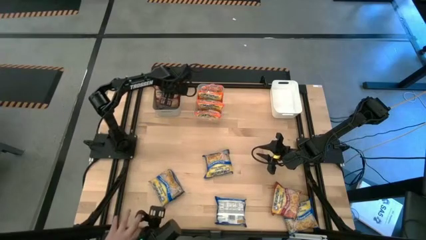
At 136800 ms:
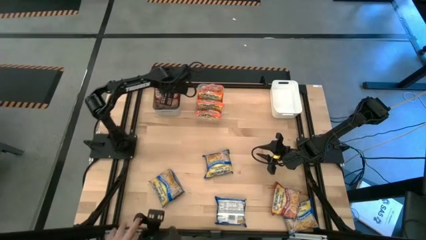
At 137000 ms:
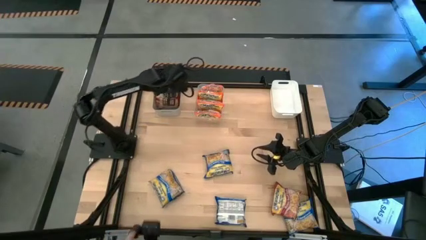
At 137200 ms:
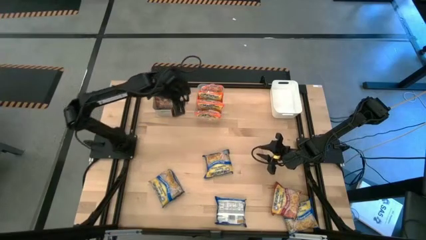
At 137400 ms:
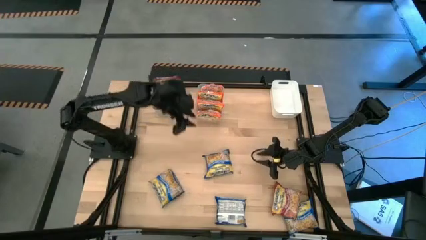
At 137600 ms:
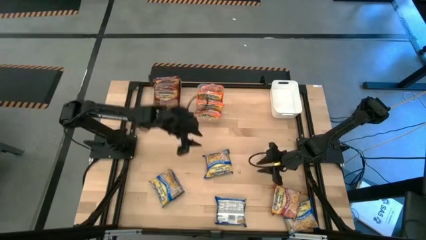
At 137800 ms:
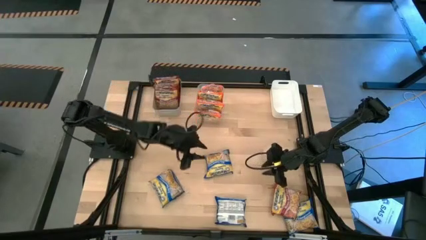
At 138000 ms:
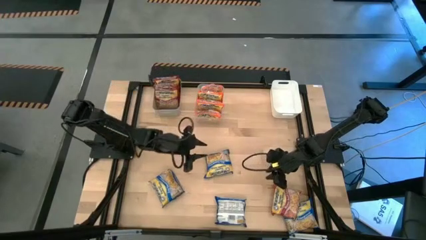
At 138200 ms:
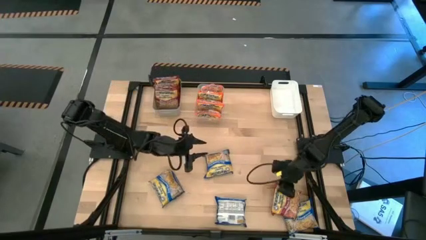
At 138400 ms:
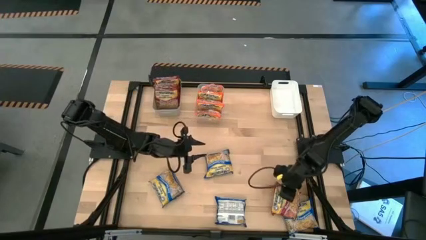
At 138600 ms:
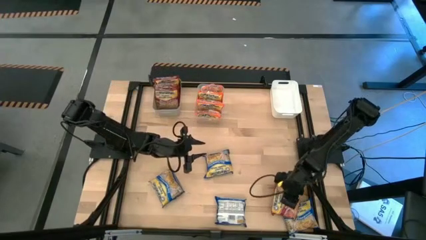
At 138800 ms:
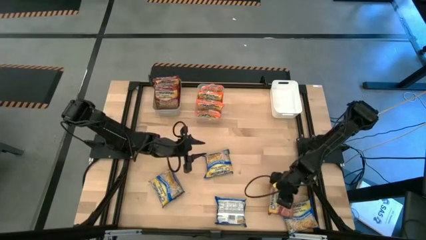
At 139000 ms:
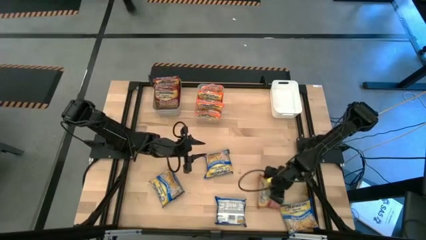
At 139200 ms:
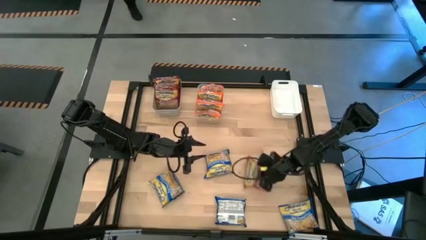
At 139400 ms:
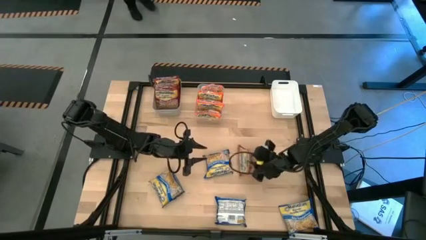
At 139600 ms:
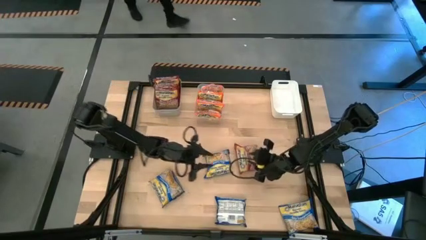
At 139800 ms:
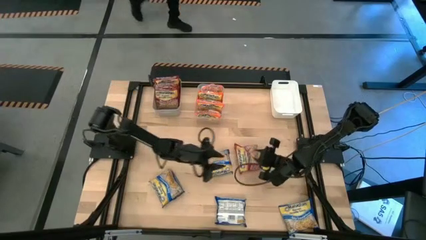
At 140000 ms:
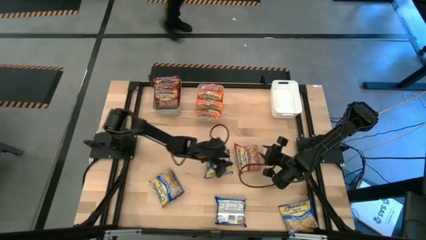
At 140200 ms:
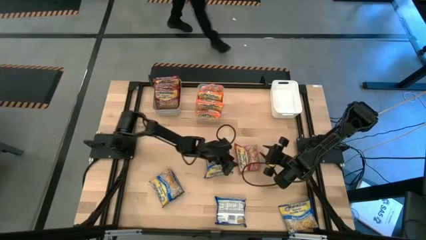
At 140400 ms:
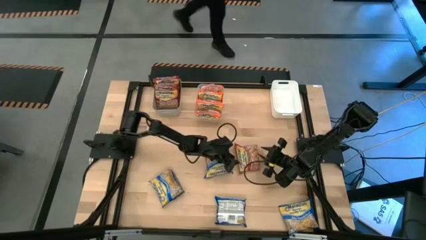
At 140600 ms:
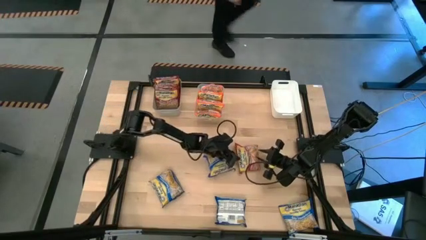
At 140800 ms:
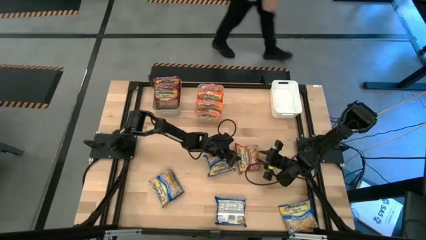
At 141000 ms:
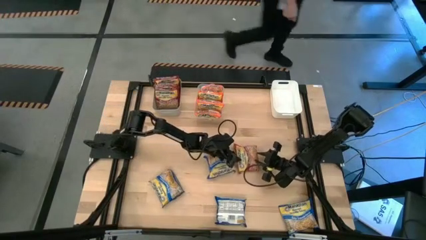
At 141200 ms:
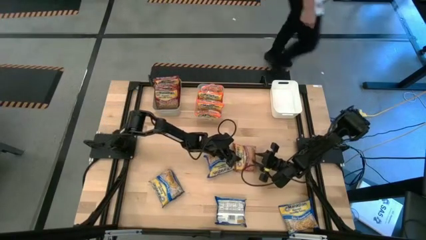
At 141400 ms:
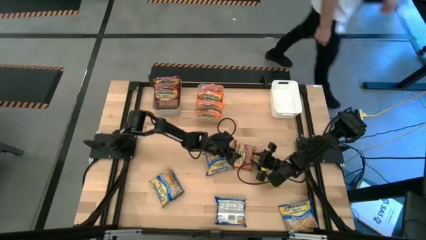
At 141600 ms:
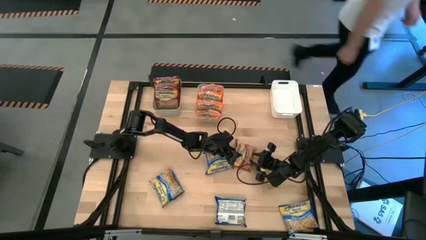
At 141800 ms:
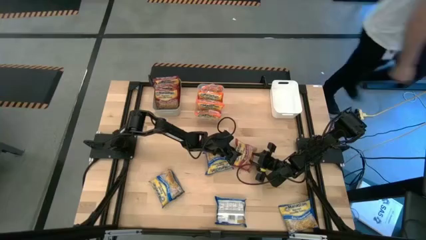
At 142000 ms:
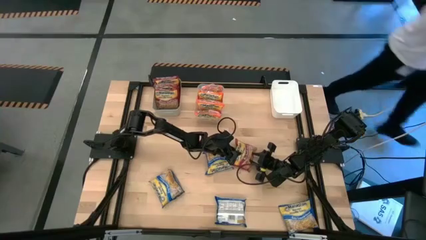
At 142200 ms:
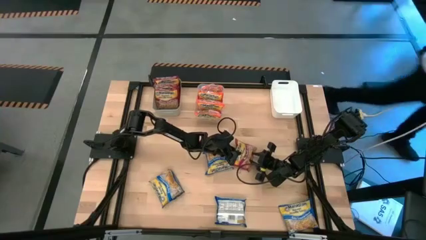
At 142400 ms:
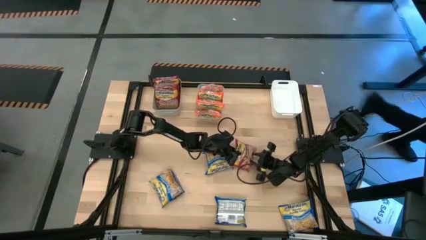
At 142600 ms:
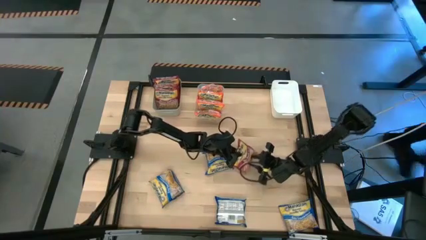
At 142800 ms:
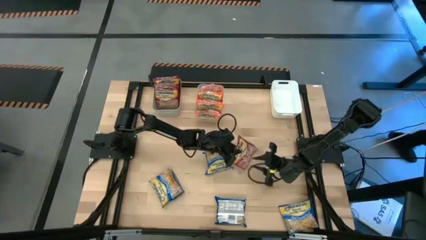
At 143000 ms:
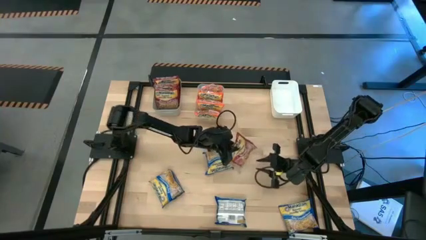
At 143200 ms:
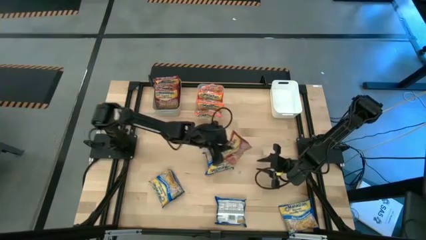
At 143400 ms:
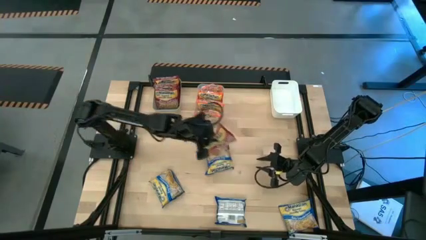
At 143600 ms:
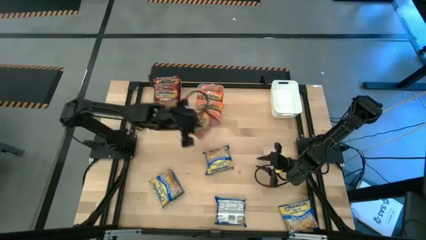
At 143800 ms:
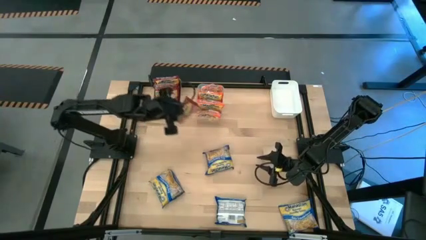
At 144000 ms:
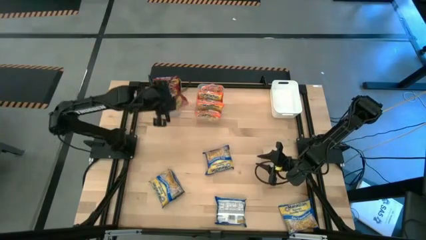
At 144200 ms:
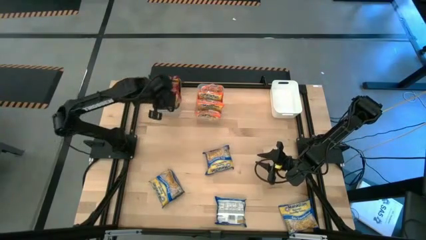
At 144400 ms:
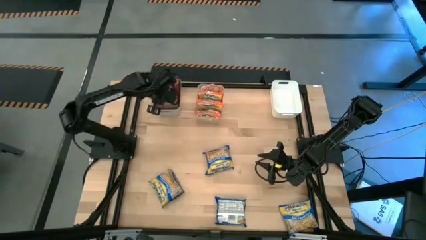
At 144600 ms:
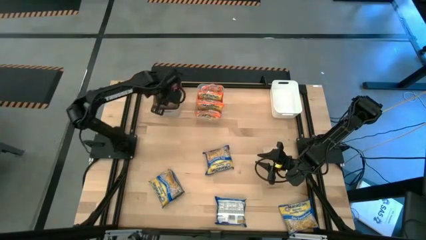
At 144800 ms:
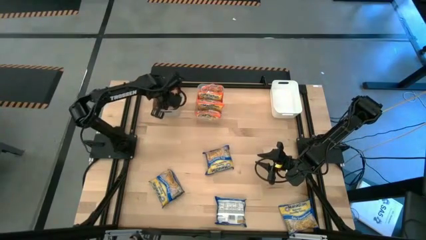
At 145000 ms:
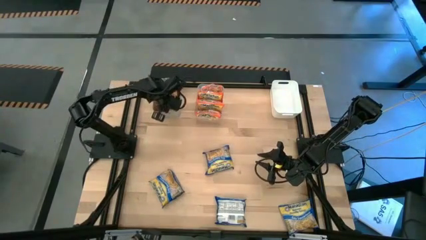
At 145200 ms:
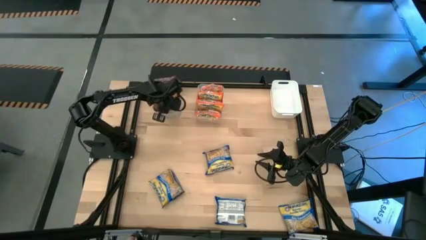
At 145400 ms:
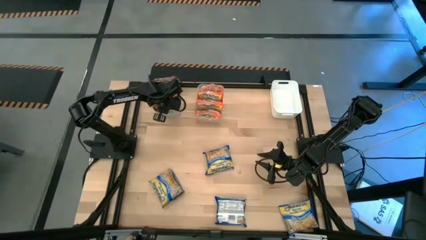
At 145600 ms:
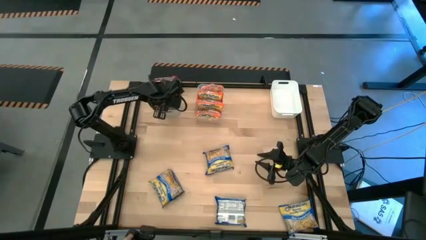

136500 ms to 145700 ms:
Task: Sort Maruchan noodles
Put the red noodle into the gray bin

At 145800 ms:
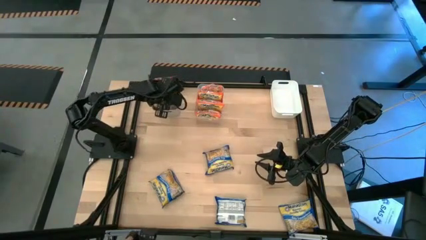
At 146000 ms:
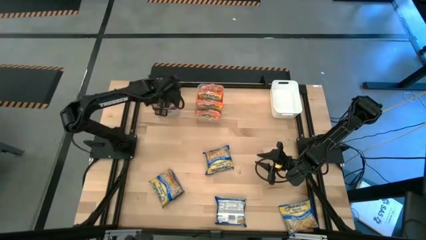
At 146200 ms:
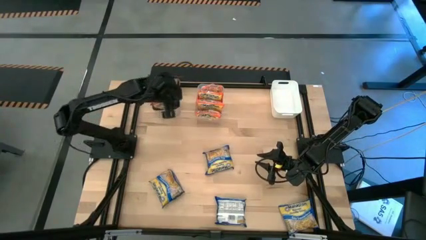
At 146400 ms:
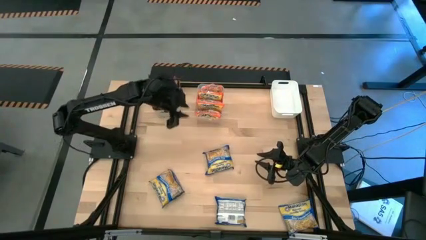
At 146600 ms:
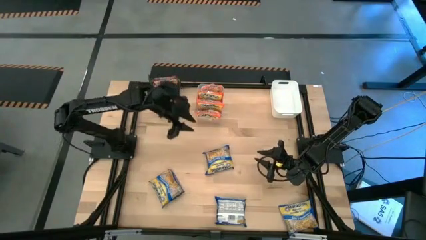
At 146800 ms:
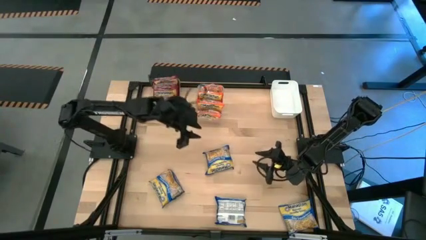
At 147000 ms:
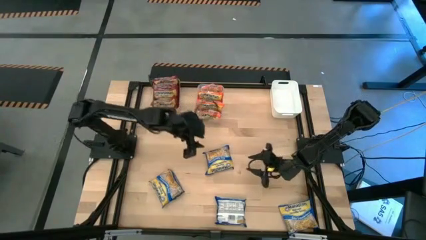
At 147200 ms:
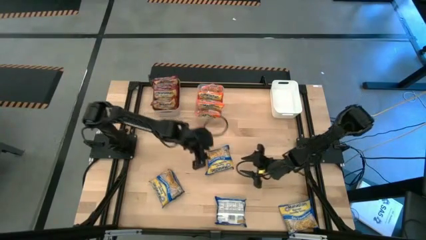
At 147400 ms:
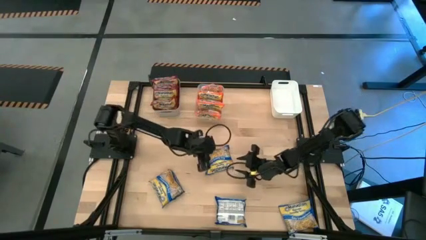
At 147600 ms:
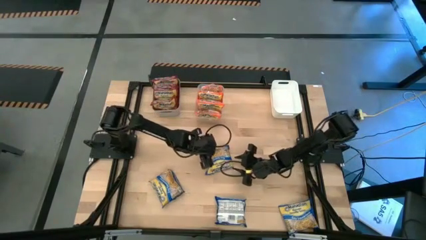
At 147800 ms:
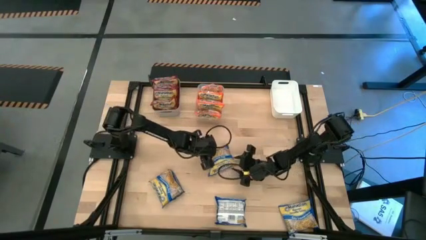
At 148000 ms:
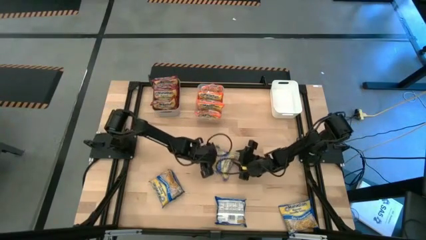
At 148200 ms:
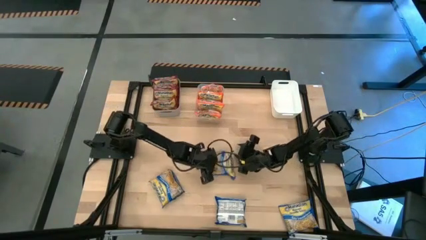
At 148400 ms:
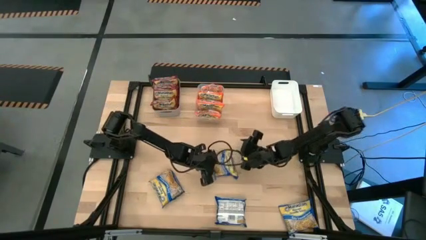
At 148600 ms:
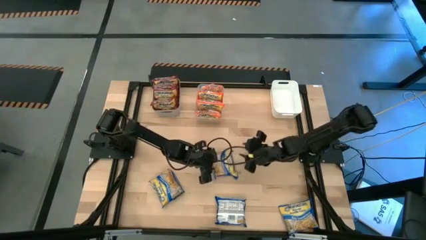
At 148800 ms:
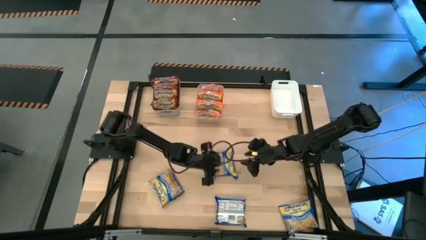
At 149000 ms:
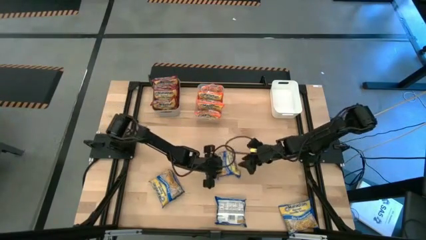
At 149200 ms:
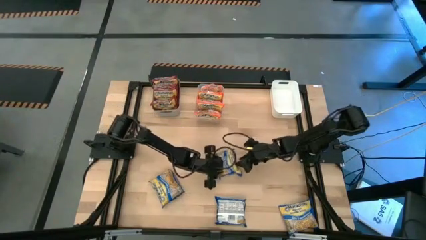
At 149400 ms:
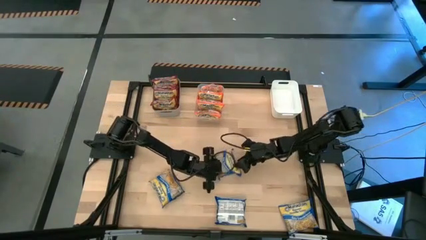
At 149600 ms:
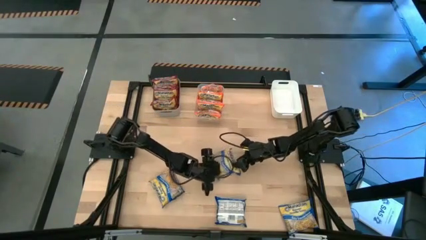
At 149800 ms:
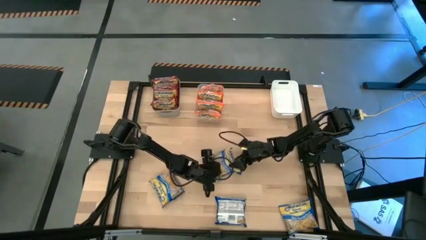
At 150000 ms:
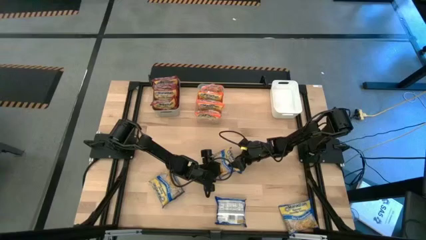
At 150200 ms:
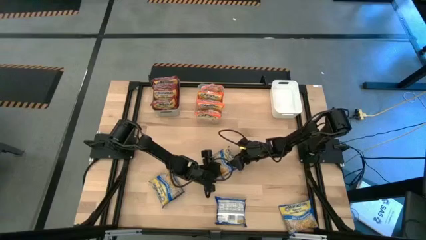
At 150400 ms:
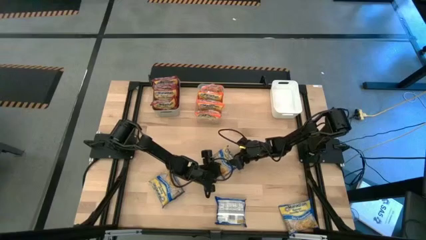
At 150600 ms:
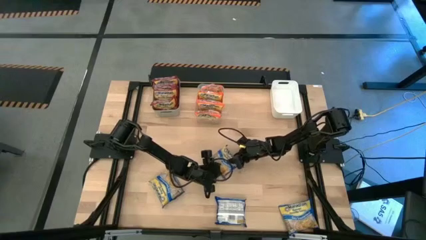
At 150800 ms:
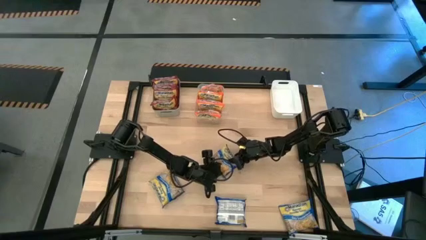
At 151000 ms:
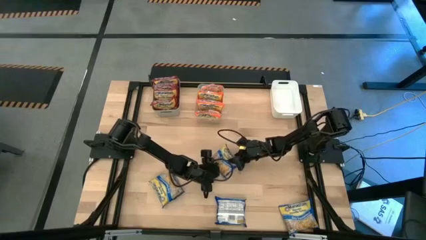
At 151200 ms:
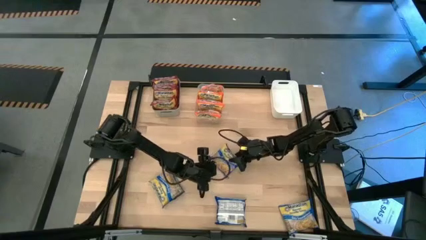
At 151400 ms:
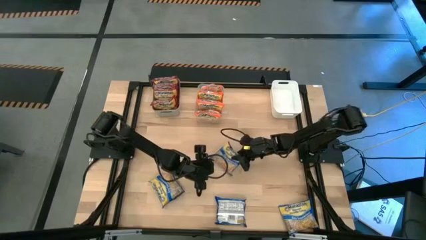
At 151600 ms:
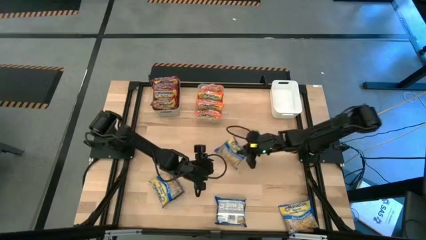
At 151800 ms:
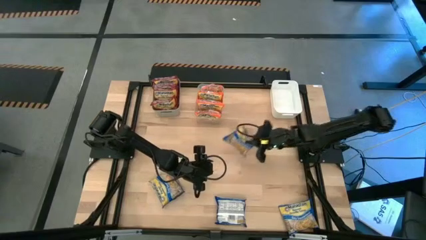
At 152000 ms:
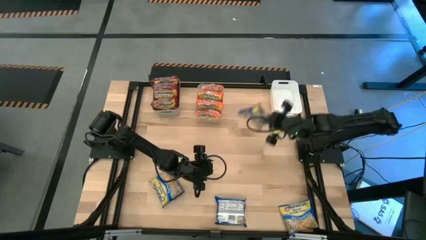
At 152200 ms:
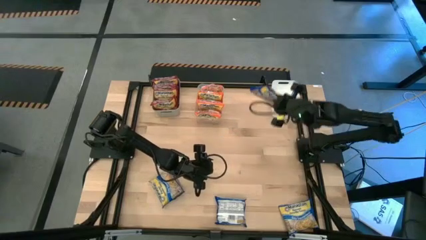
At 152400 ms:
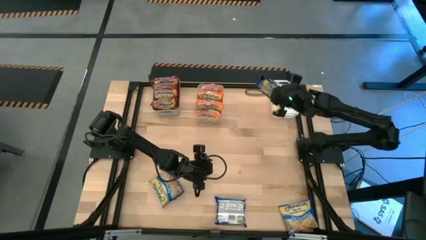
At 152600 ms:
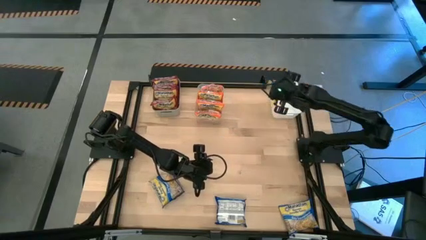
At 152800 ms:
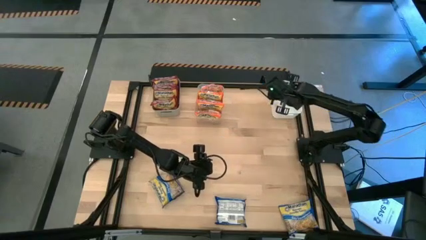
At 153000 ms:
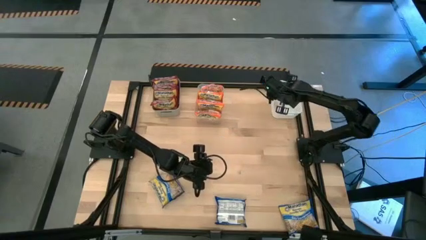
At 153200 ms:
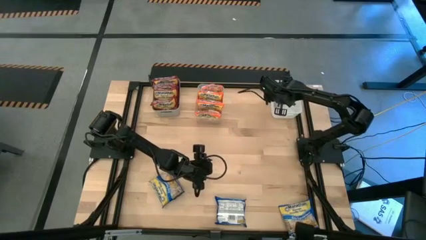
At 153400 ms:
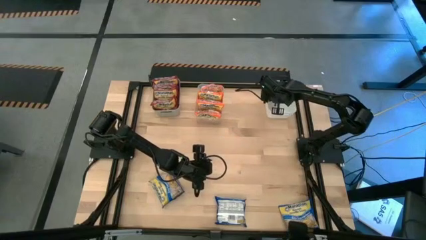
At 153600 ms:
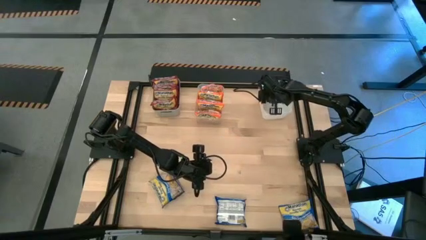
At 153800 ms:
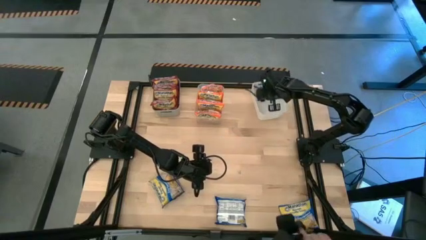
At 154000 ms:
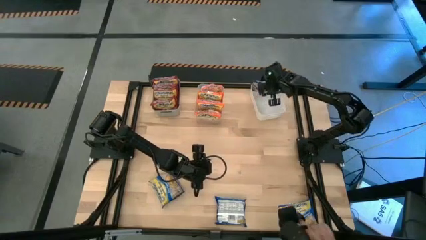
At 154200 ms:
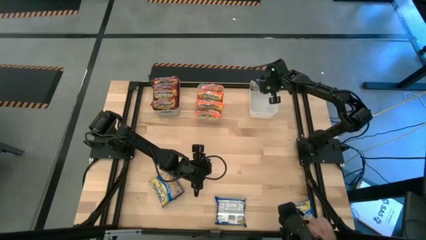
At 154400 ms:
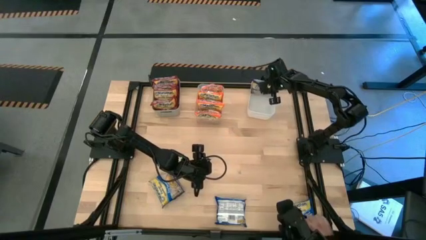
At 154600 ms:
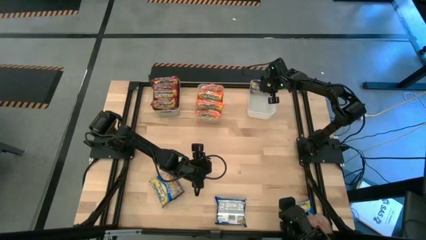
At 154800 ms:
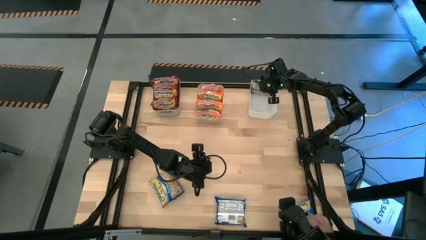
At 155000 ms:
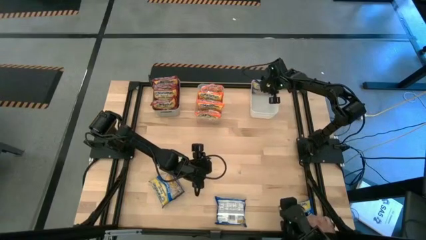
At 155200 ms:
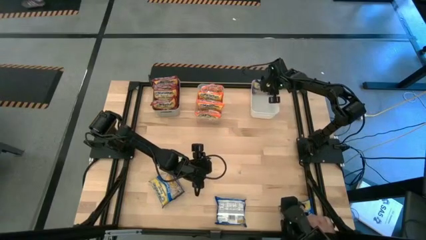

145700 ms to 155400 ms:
Put the center top blue noodle into the white bin
